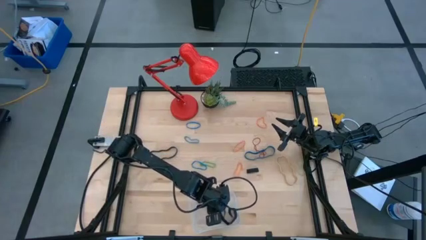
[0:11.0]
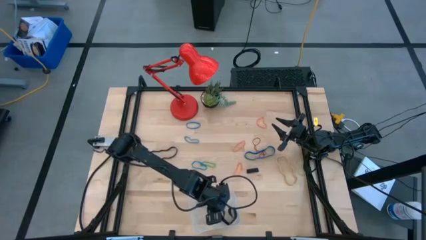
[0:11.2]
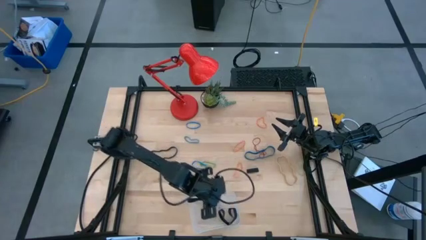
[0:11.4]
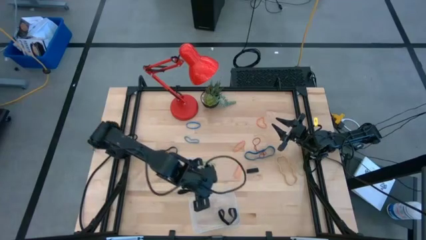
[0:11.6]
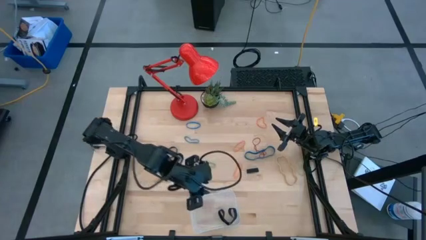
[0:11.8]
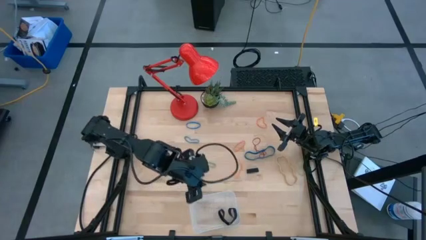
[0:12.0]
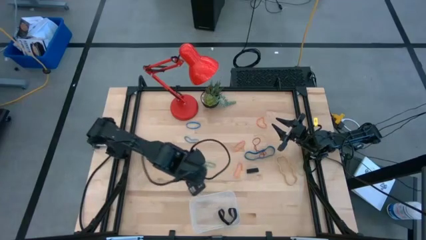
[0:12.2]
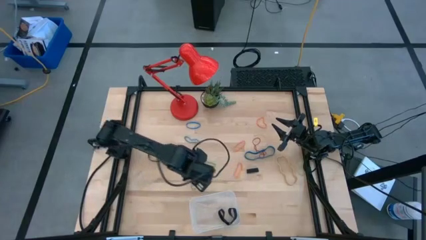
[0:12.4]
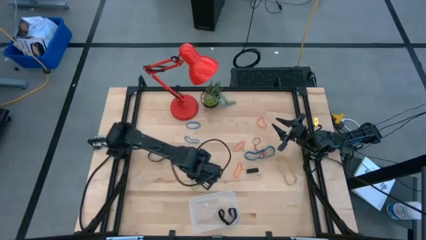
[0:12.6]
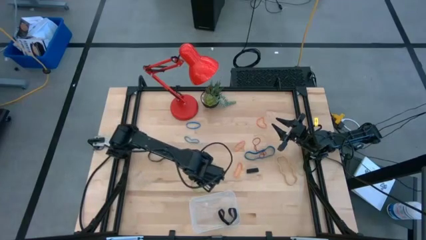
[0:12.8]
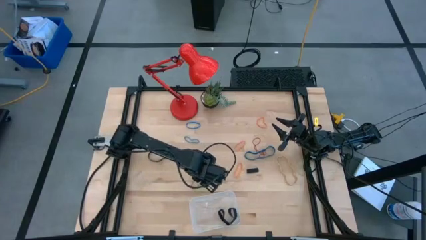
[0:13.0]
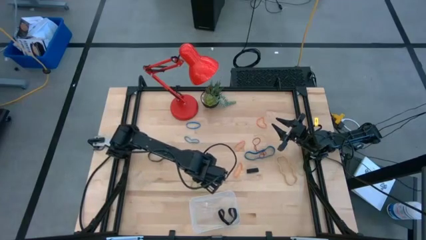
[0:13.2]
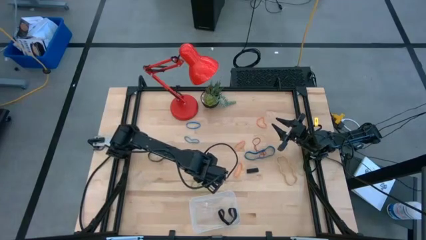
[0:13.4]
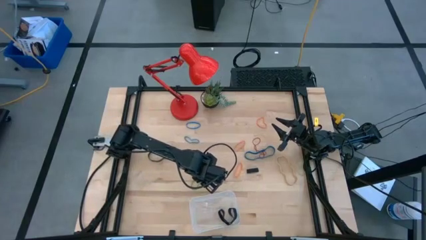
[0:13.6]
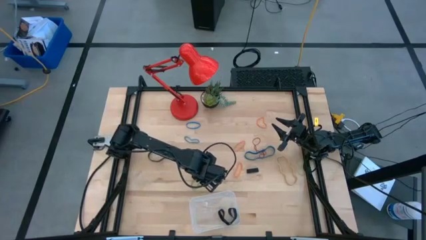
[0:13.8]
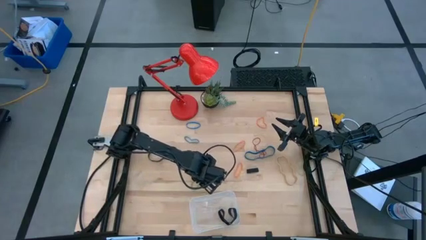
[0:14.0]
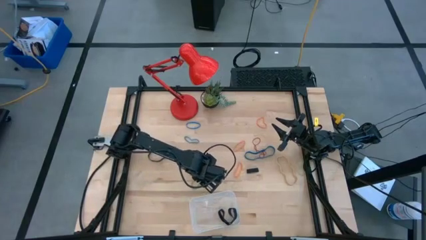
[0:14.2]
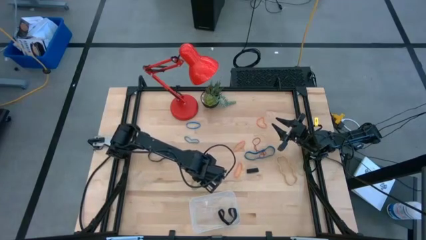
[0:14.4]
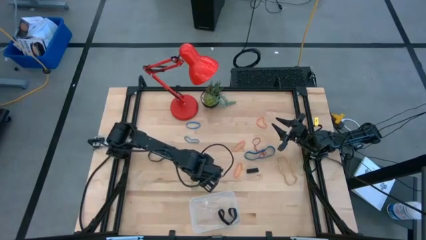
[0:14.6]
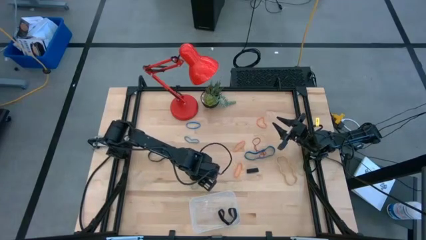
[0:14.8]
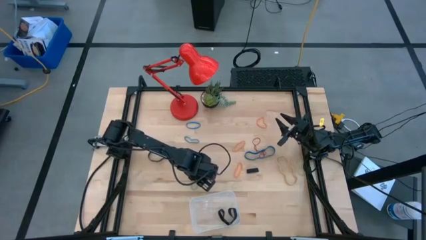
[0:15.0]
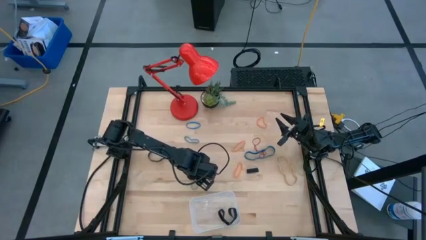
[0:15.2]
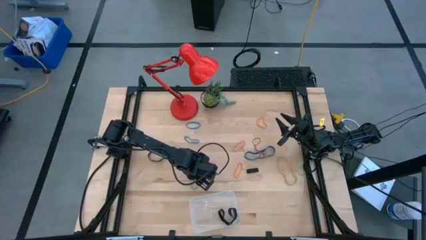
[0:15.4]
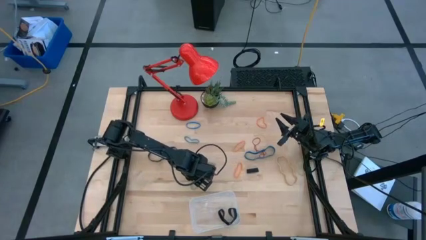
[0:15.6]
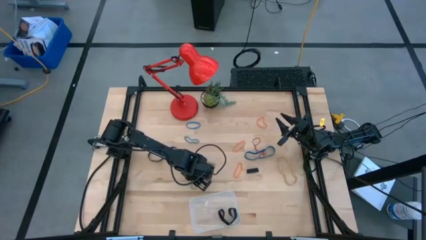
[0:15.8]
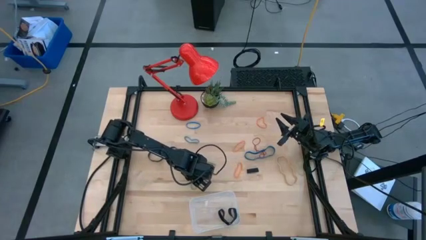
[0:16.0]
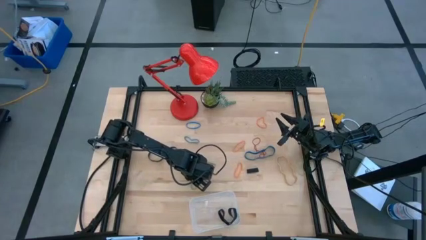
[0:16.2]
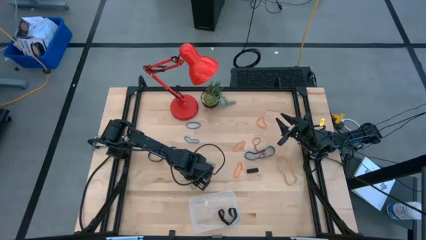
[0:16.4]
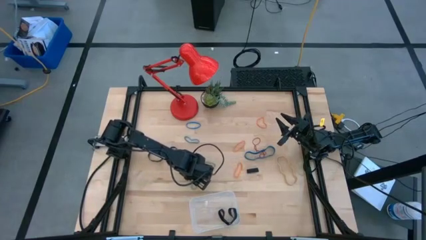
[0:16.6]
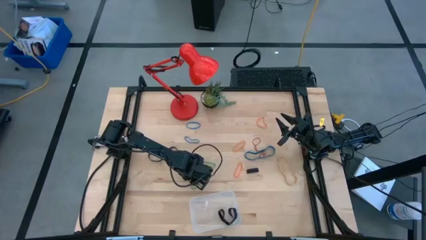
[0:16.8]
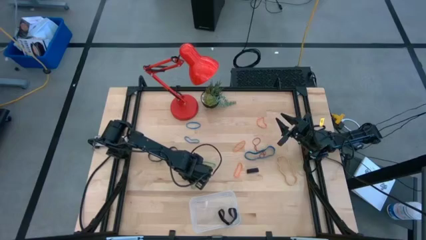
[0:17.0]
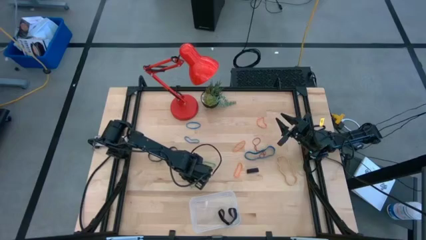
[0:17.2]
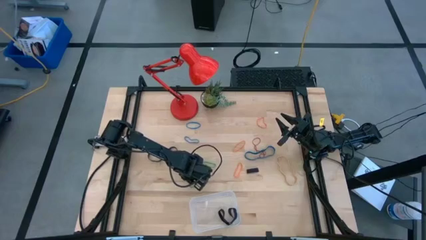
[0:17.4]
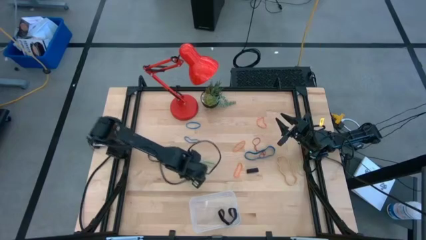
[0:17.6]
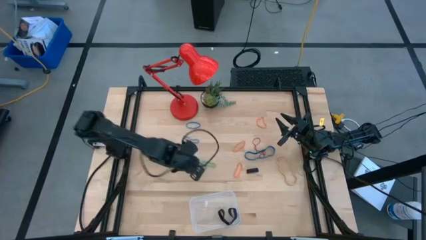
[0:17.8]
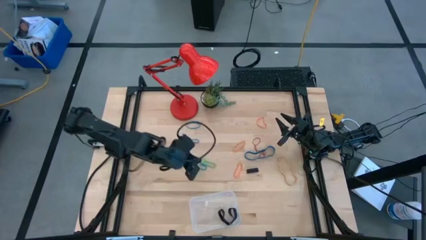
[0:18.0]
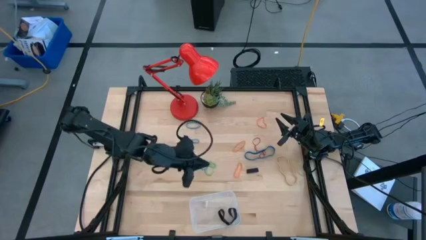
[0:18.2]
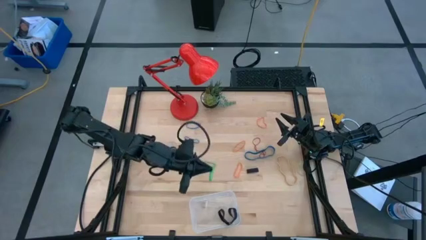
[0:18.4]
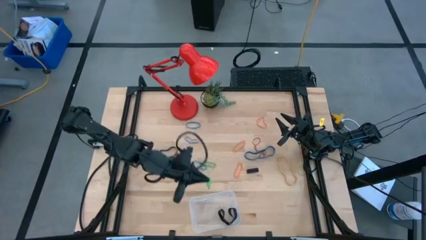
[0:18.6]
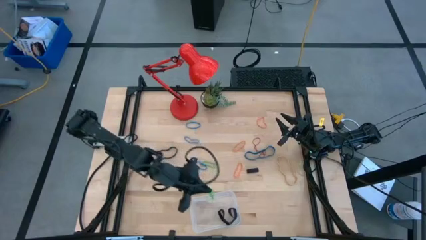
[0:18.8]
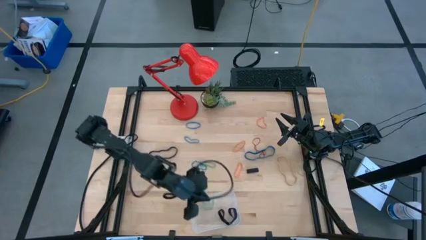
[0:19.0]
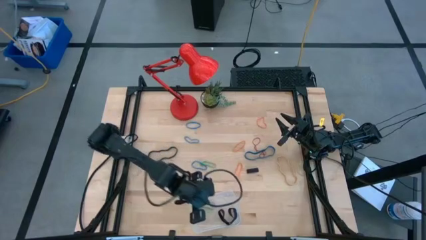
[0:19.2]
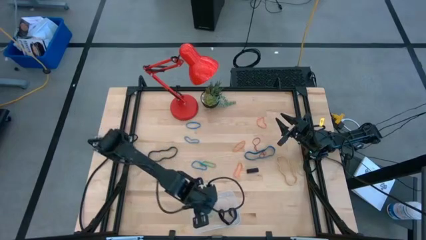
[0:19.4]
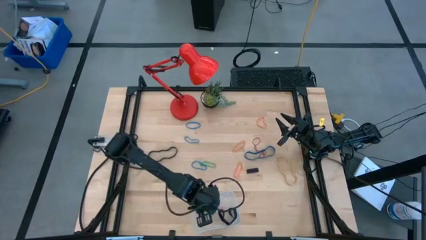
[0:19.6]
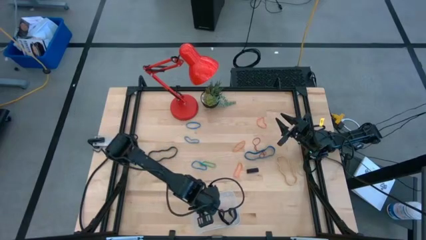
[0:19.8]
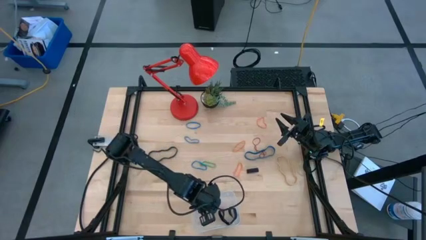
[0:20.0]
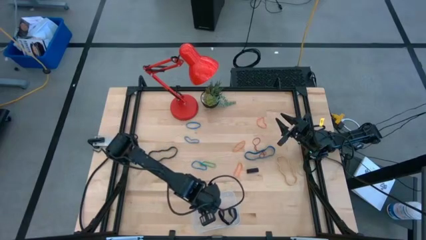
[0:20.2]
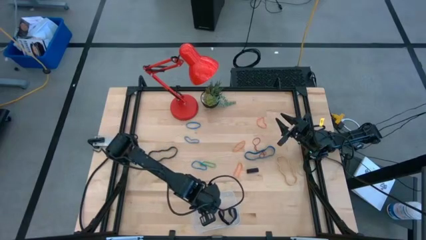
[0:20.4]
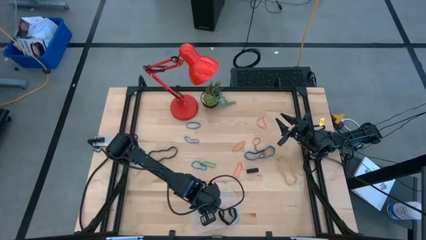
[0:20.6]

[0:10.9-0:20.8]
Task: Pick and place rubber bands into bin
Put the green rubber band into the transparent bin

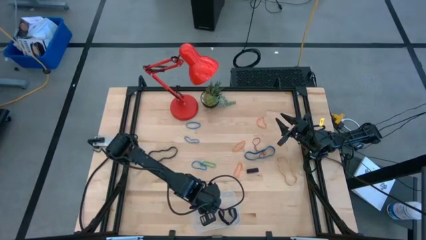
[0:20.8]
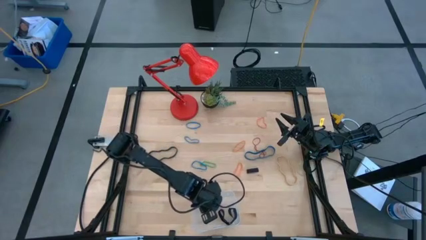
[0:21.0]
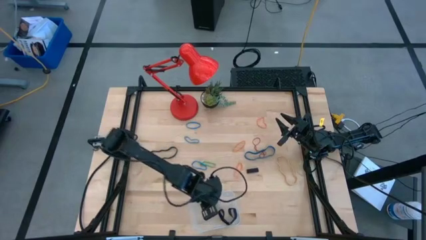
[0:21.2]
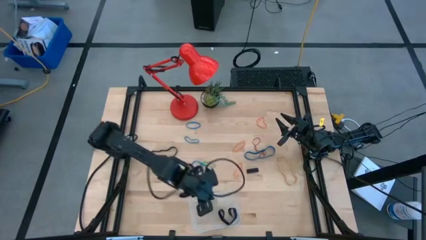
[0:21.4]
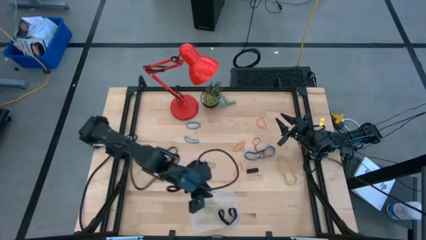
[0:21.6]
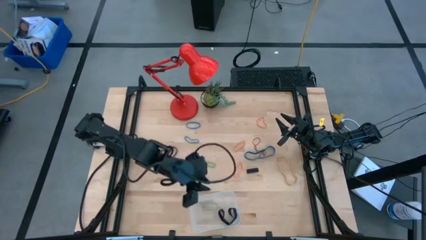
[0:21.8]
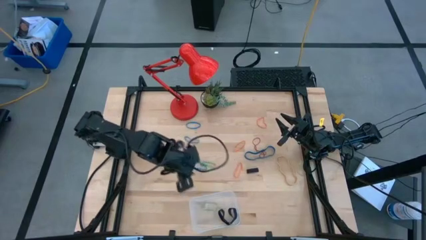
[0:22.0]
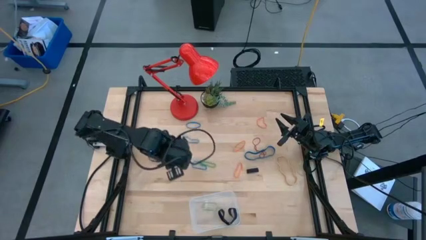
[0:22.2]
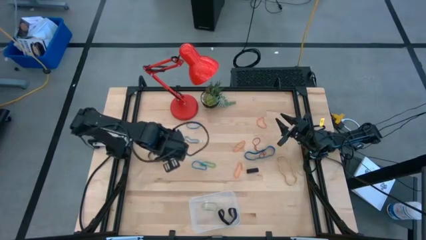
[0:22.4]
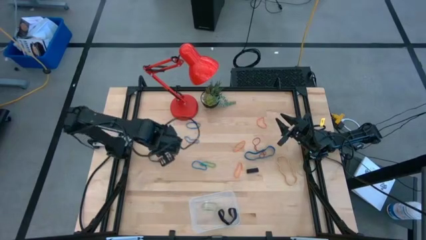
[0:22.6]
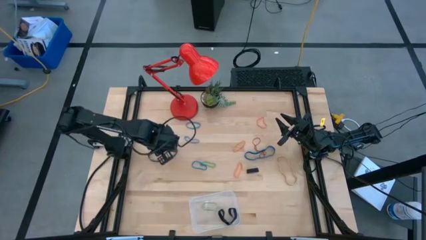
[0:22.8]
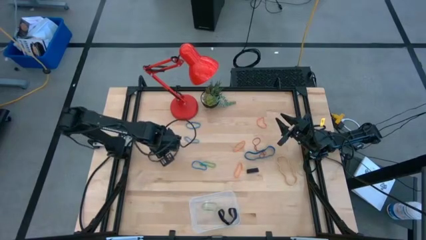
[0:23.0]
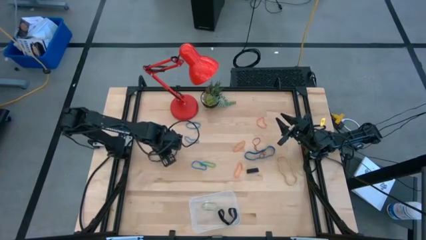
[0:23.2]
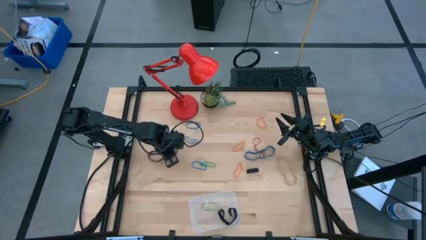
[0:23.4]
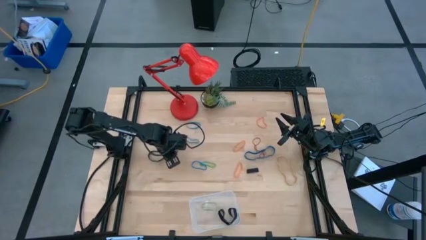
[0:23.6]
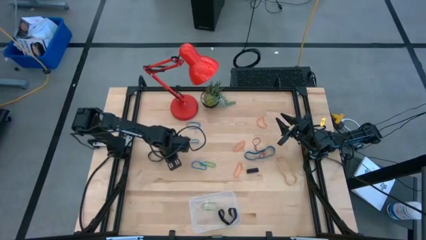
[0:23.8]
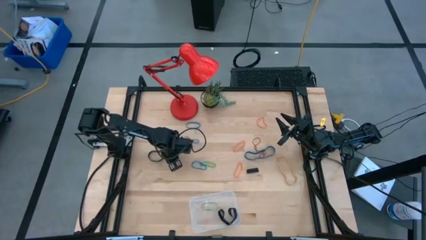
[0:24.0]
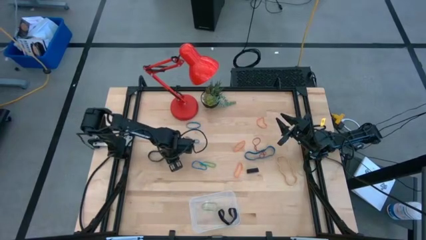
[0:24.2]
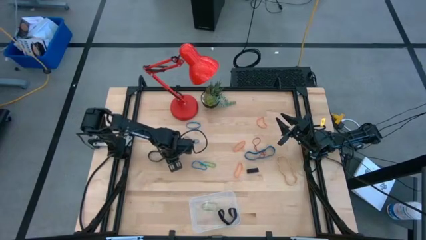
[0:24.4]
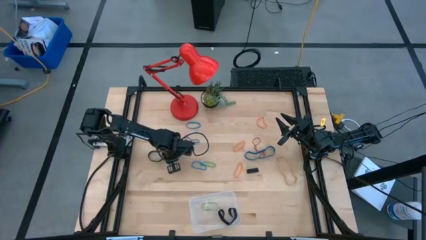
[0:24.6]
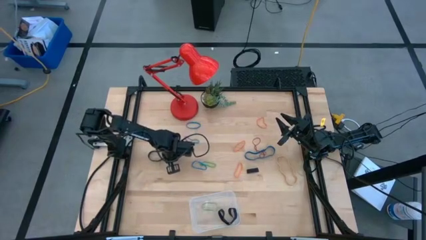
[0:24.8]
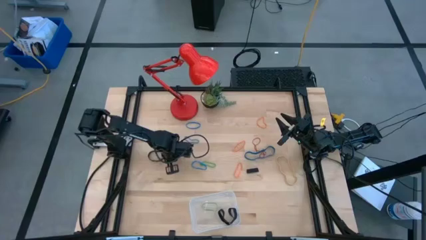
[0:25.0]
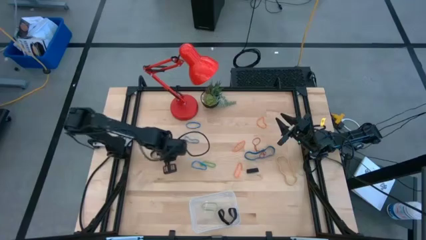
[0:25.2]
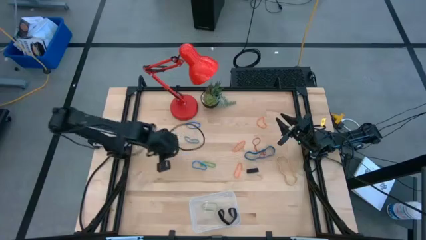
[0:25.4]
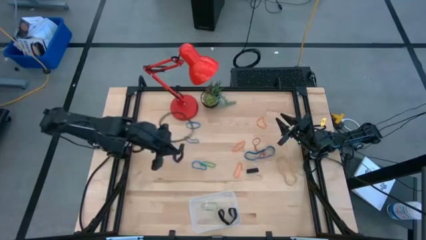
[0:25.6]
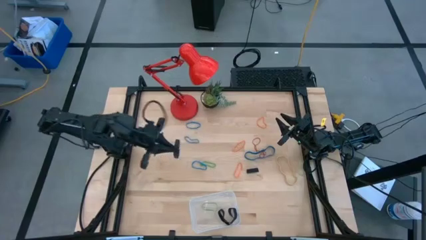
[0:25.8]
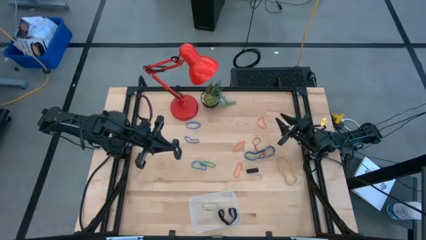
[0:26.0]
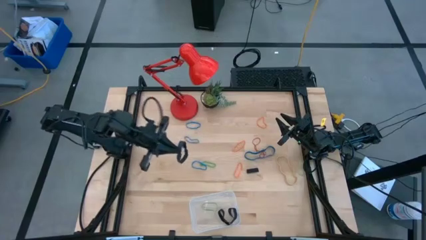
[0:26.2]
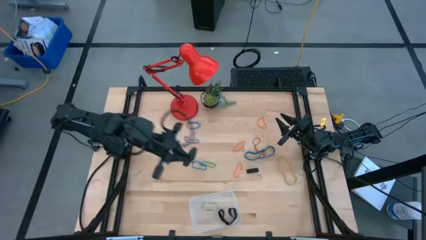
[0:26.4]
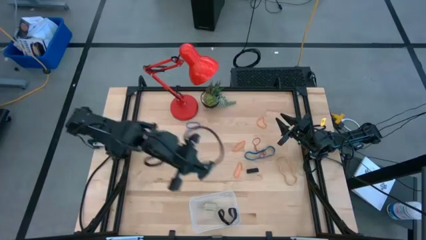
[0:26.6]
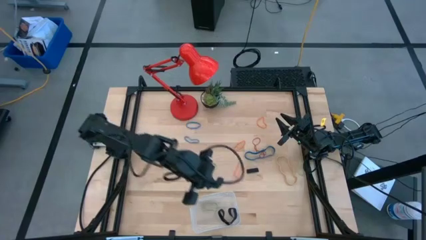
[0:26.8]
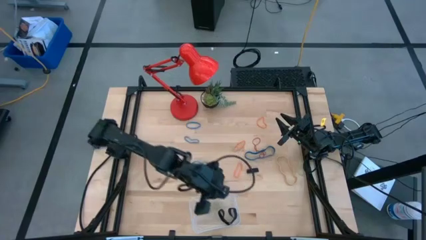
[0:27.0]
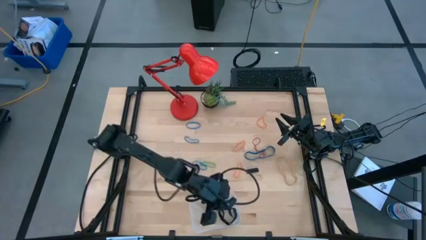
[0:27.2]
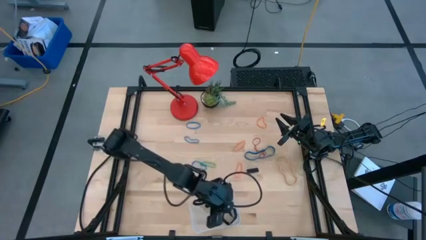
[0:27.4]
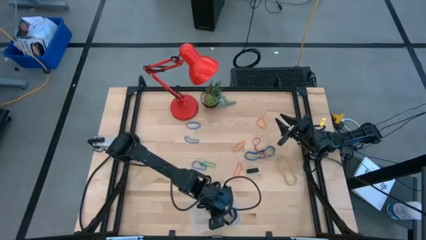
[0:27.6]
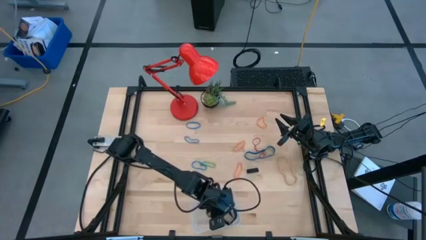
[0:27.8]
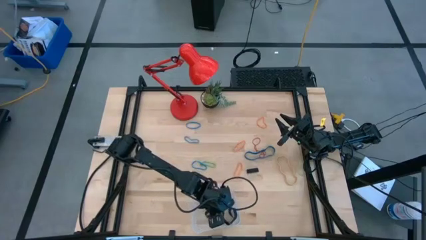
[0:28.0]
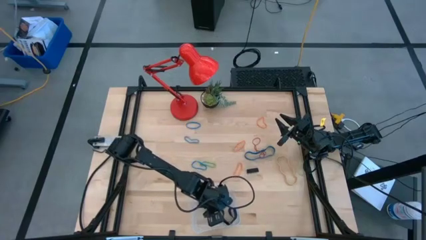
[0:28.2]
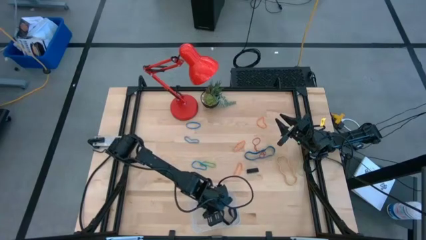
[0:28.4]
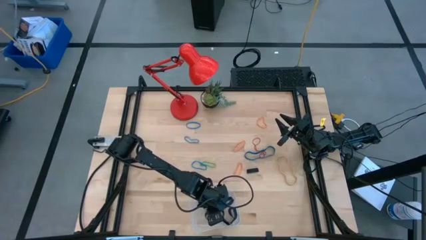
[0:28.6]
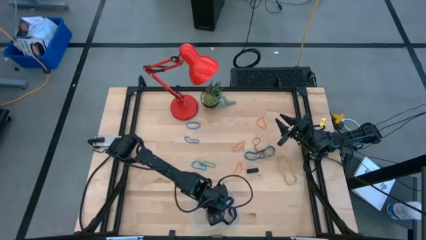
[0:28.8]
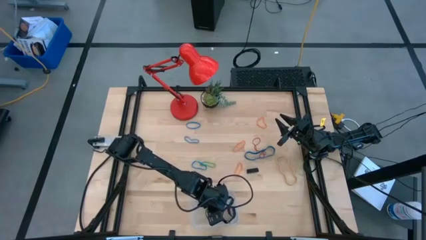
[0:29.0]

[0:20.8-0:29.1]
Put the black rubber band into the transparent bin
